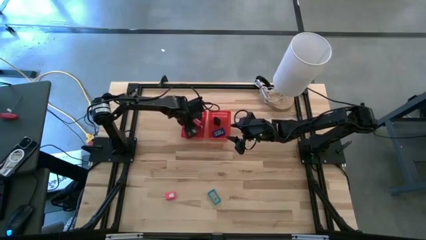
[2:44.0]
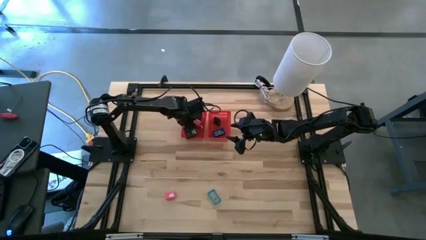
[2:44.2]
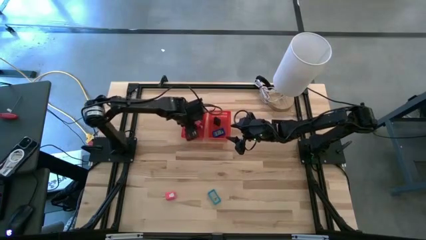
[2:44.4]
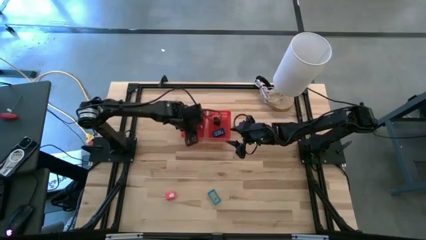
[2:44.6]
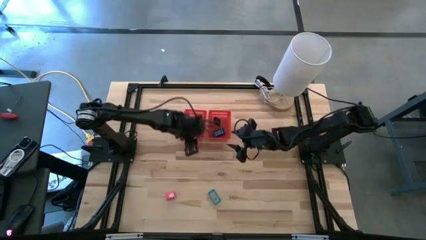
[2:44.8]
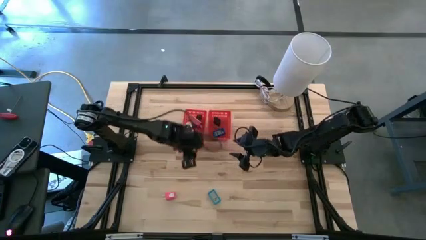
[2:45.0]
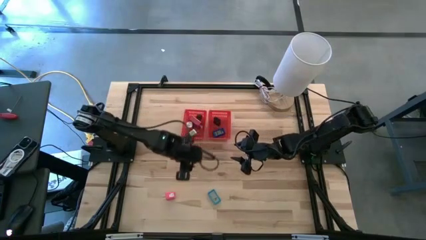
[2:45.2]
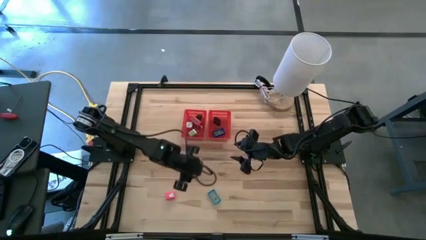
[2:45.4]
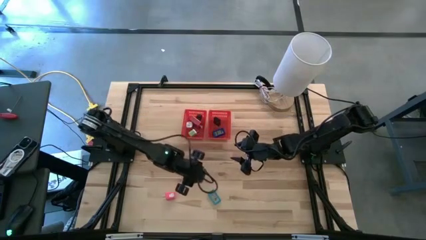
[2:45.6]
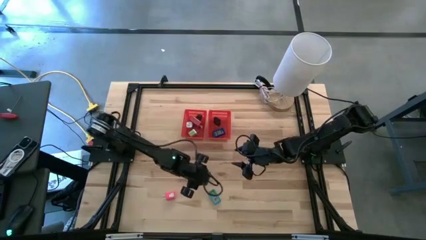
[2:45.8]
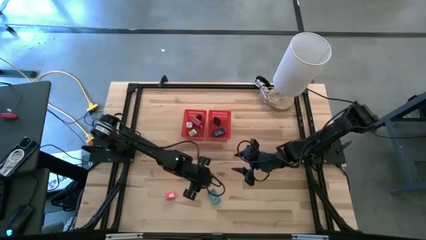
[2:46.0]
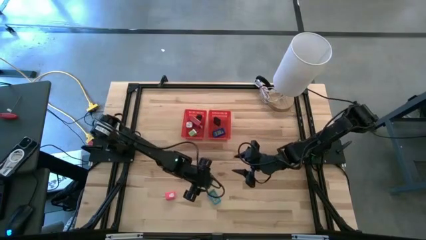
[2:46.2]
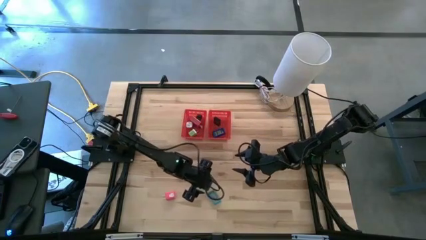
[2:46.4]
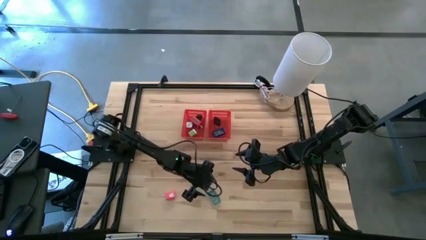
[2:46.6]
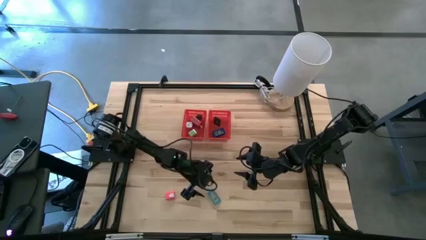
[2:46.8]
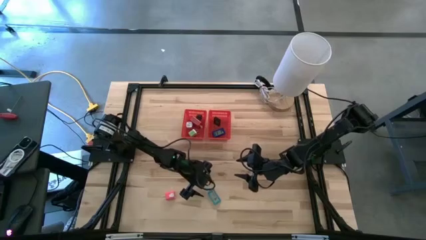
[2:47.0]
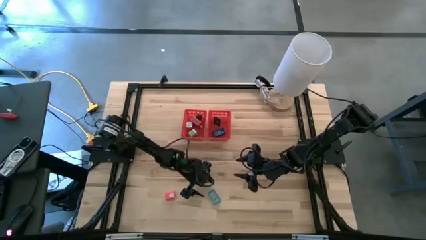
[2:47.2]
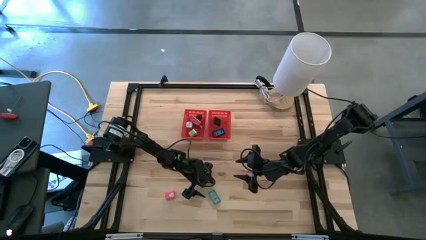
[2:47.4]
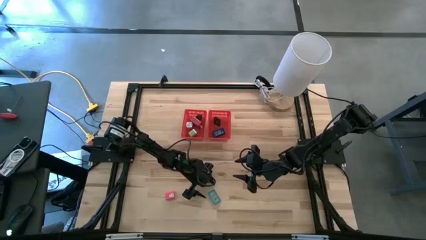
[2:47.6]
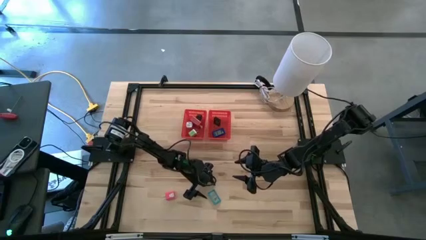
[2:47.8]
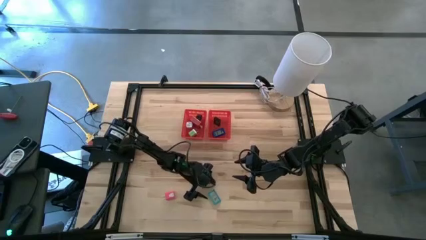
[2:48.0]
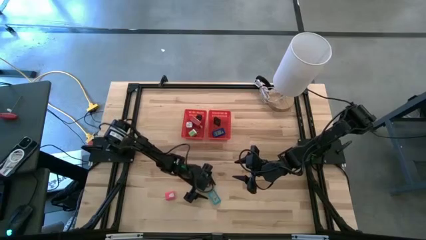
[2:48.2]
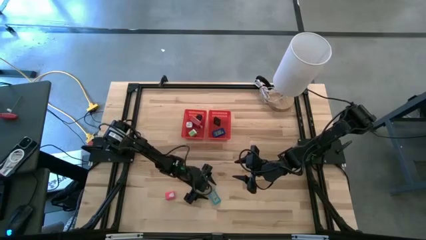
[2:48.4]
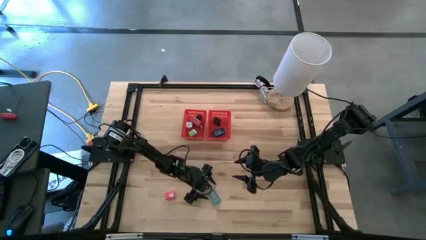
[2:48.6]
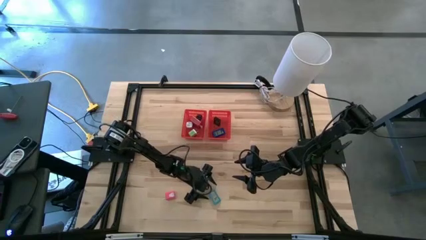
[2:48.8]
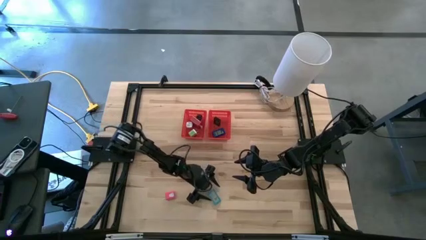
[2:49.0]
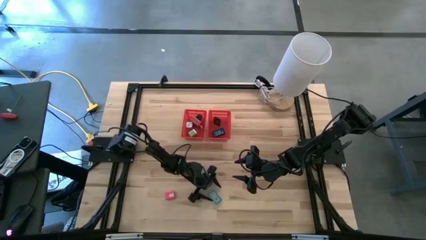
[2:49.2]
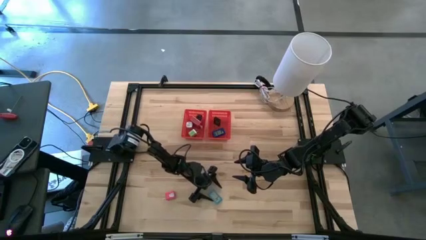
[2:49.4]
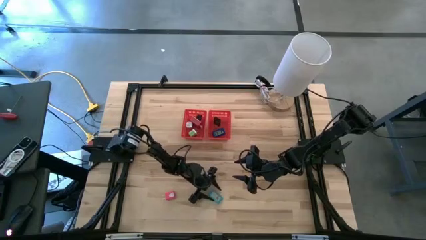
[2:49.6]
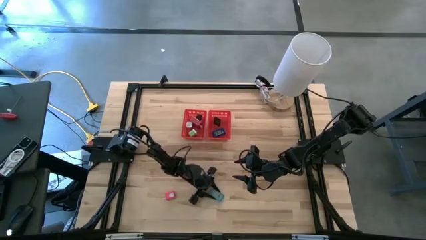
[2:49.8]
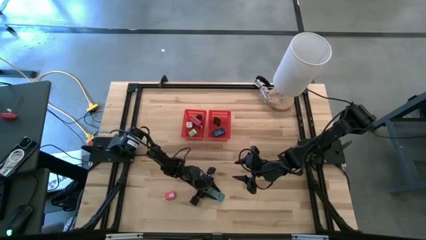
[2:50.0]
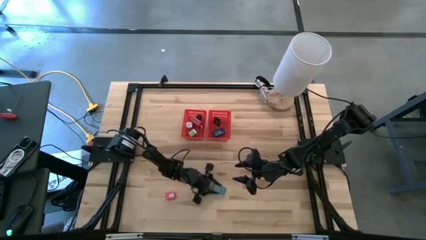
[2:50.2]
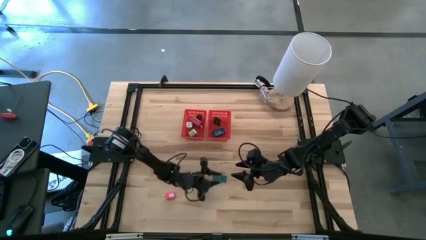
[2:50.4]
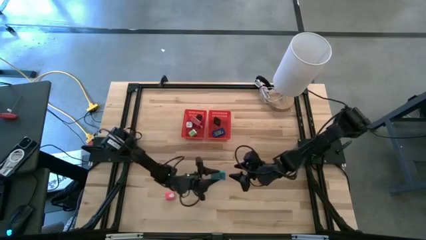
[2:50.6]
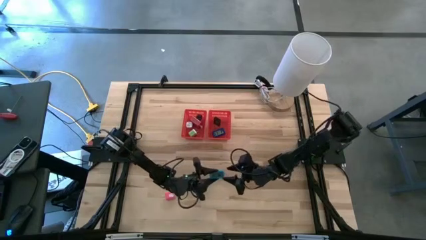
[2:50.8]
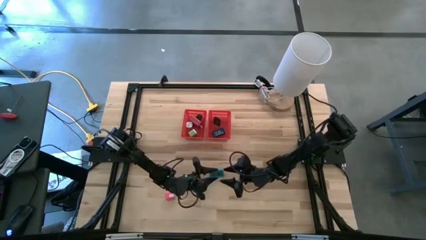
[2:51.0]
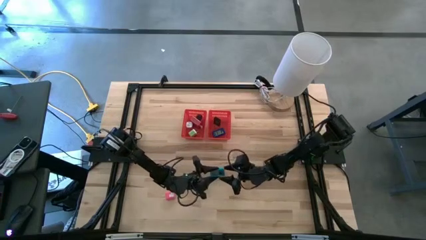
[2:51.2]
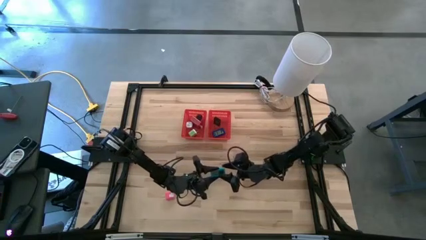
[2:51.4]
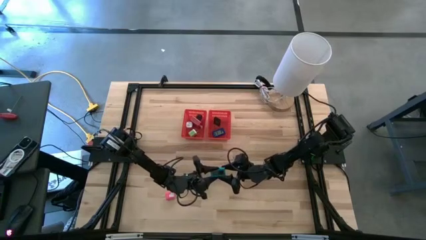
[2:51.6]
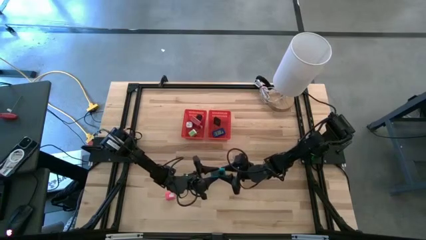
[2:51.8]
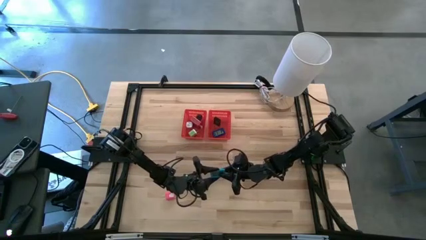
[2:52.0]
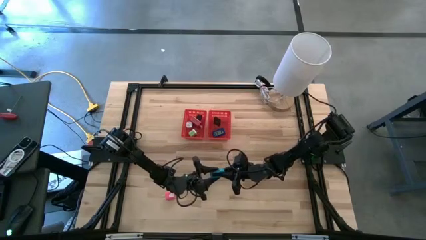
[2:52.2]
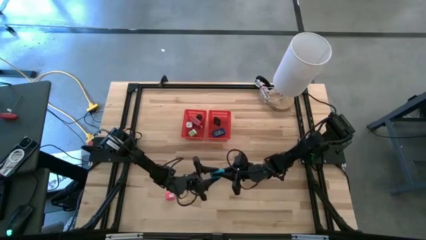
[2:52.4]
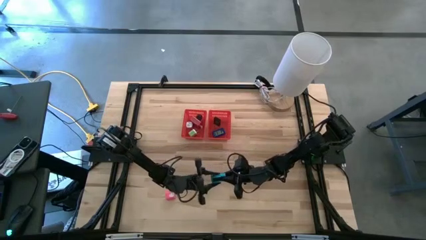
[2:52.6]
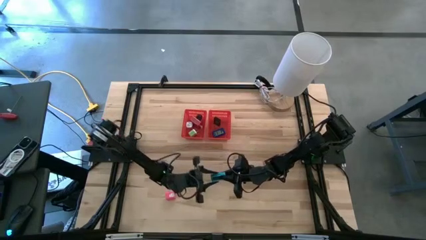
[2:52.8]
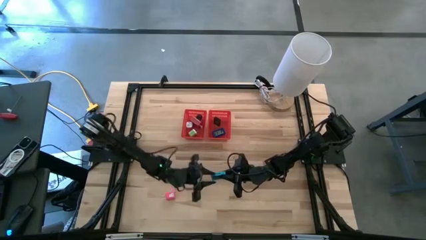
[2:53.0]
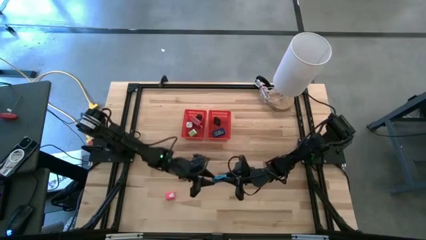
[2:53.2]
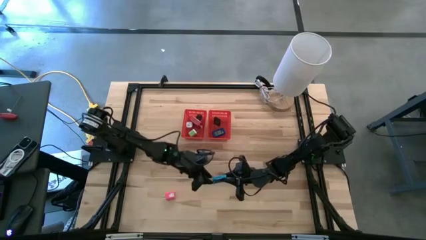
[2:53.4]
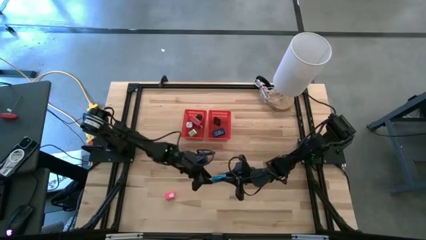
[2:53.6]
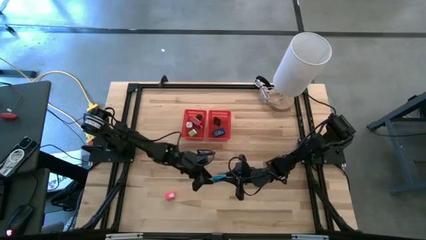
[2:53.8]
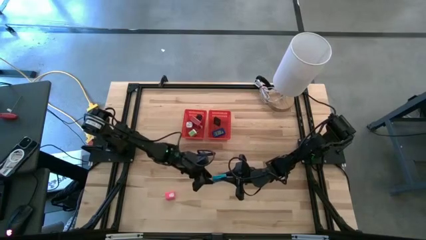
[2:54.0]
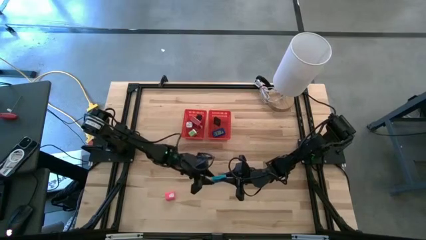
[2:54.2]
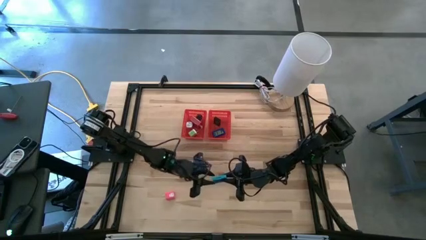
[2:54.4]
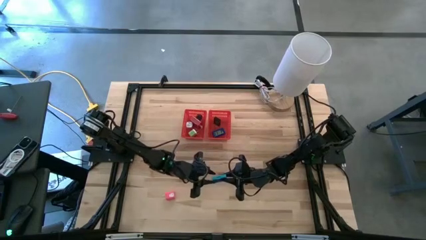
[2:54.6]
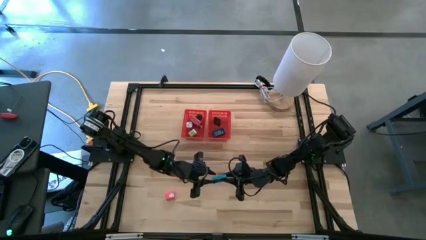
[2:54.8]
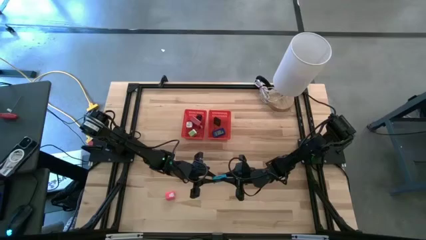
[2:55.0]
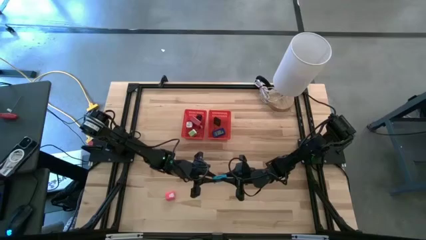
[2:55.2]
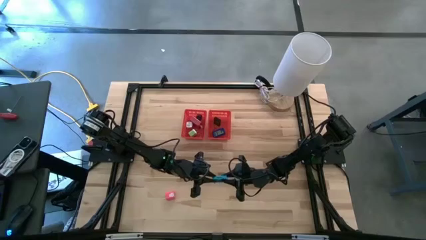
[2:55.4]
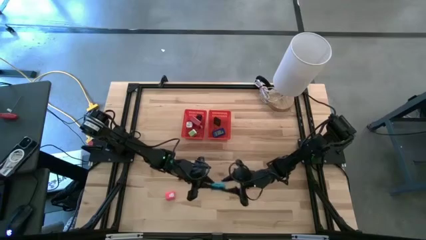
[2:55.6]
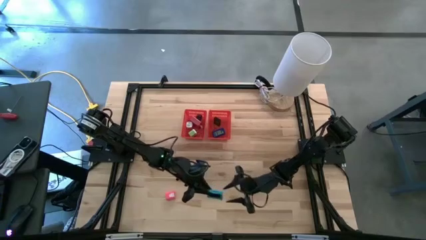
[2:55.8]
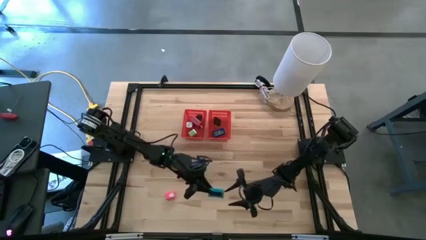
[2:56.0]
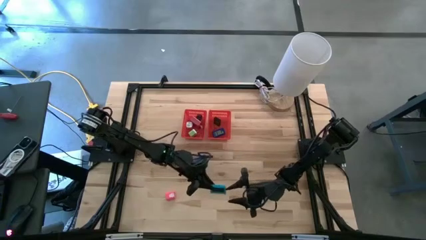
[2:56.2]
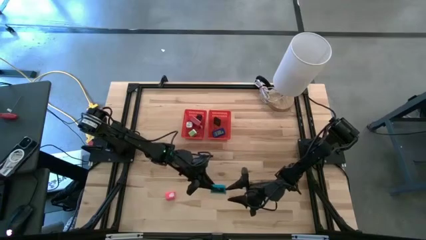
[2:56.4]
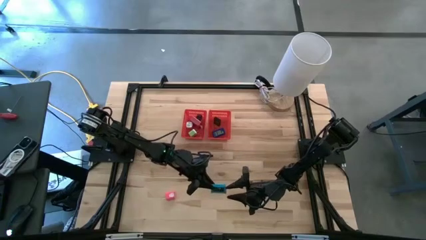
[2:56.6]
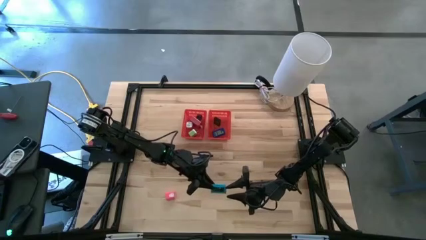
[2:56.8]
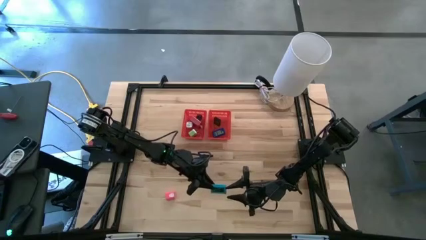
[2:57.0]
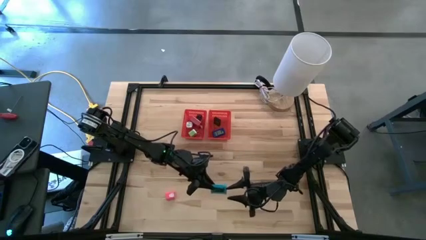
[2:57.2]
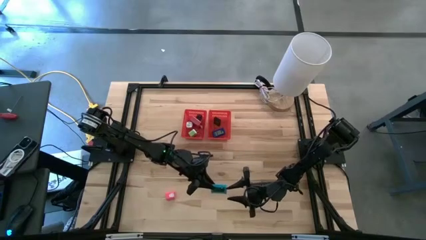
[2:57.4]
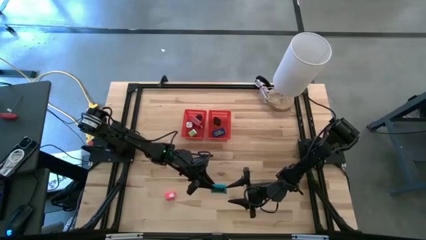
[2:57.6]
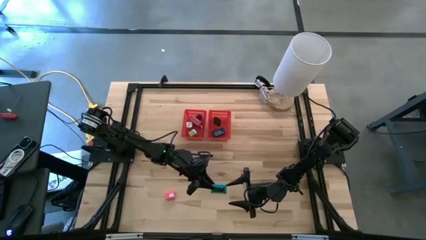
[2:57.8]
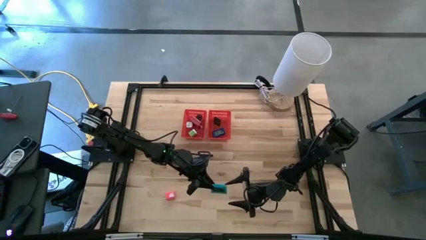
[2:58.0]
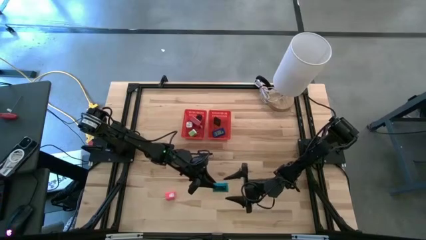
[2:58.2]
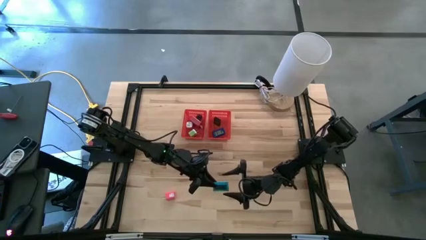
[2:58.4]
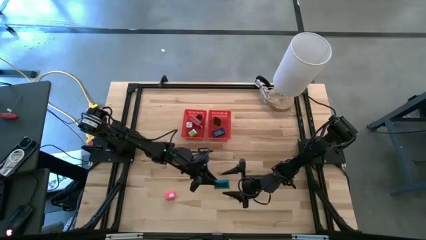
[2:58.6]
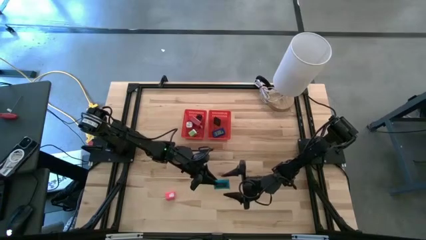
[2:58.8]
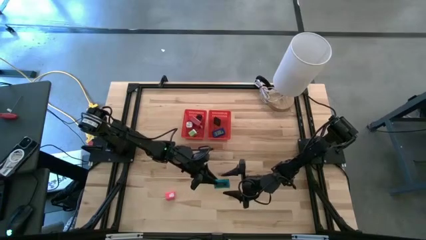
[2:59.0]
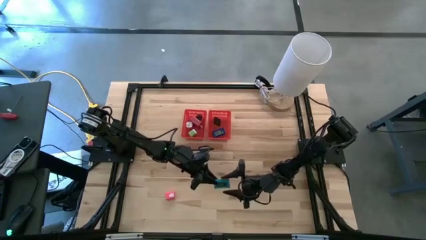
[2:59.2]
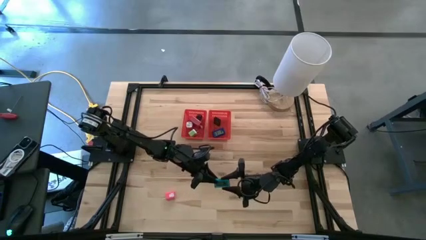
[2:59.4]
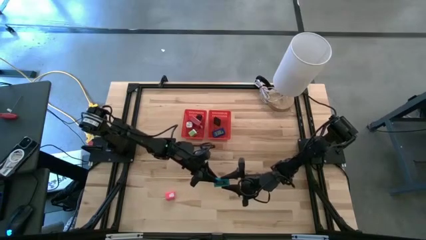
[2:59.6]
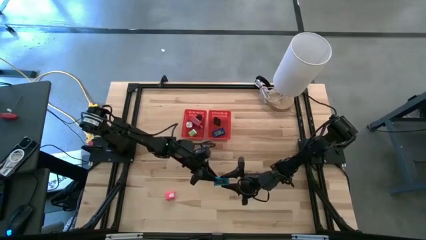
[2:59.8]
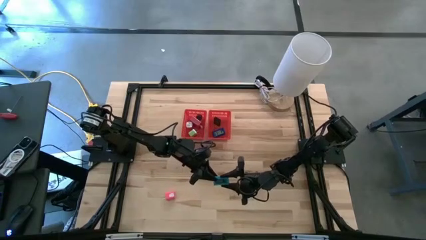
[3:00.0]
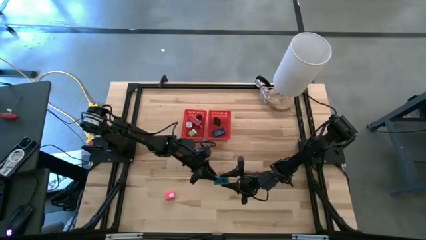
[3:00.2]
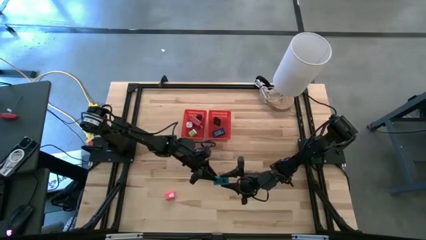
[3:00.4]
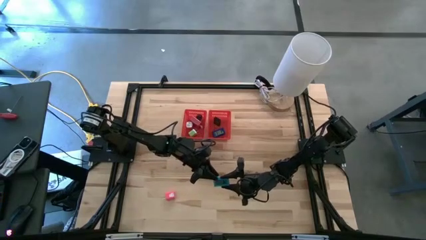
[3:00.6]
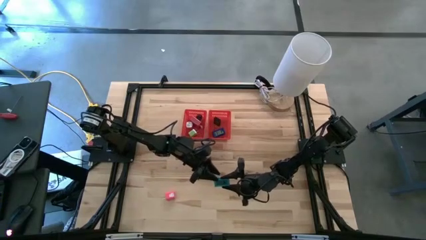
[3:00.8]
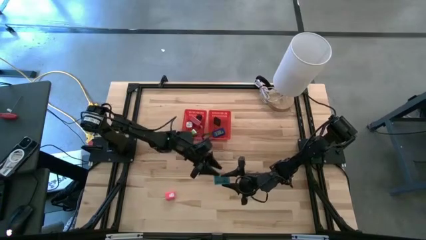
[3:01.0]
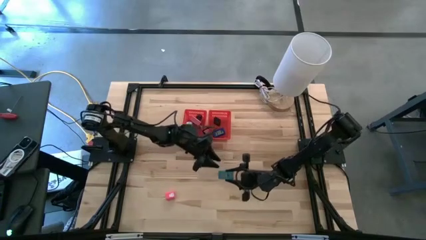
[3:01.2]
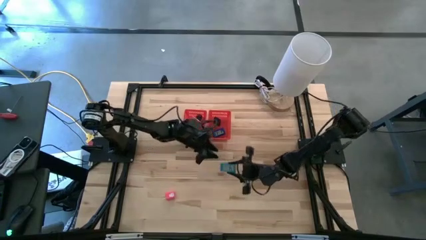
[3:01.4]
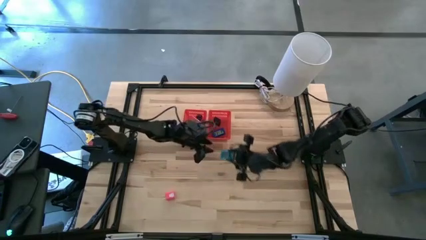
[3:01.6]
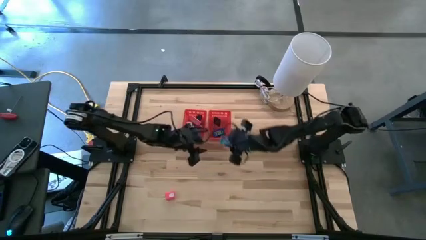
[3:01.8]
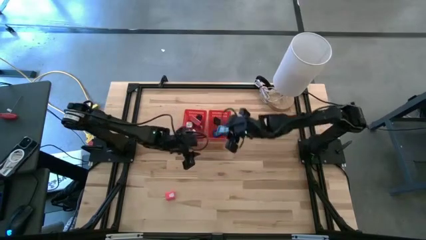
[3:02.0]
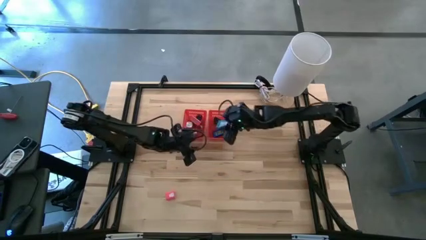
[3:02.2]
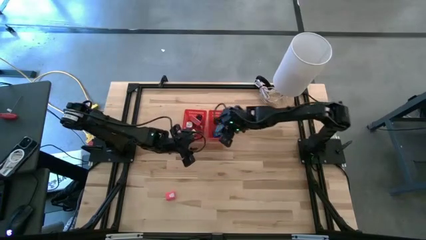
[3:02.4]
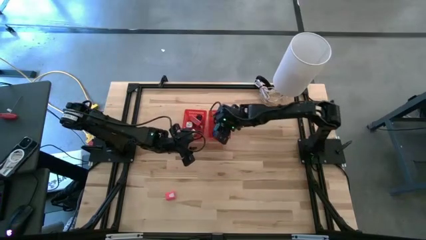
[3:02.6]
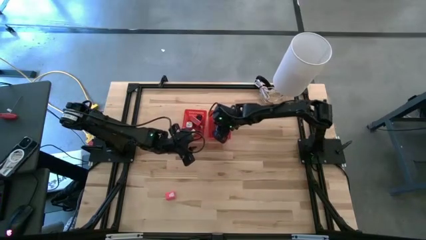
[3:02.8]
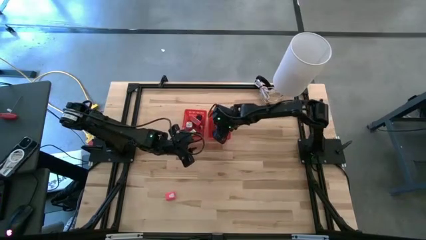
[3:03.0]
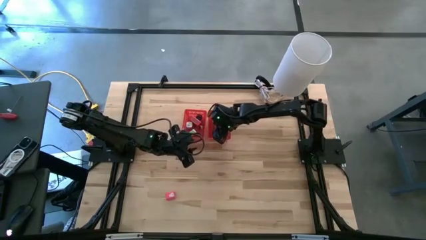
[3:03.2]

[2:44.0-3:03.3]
Task: Pick & Place Office items
Put the light blue digital clock into the right red bin
